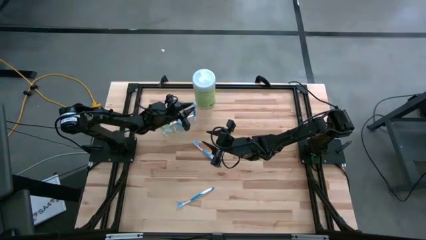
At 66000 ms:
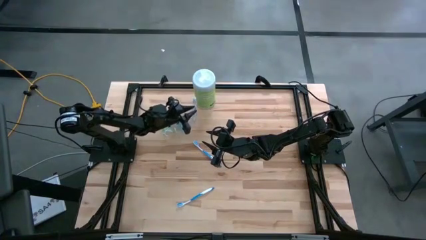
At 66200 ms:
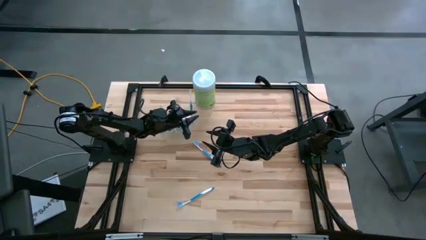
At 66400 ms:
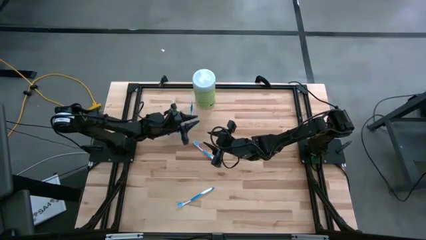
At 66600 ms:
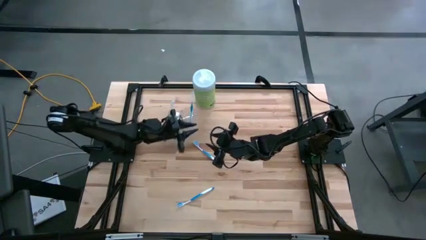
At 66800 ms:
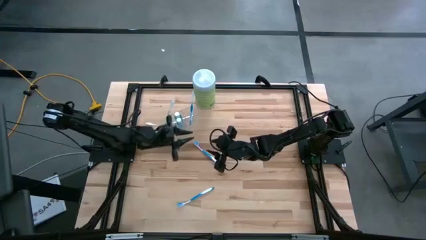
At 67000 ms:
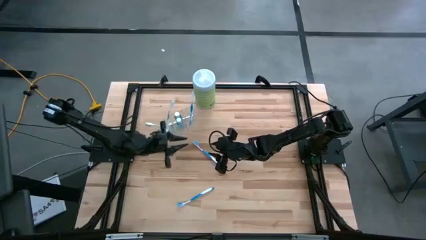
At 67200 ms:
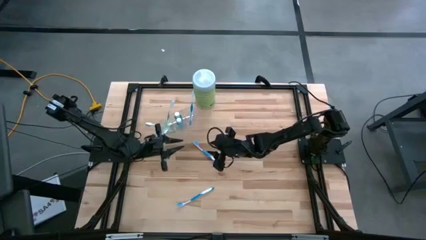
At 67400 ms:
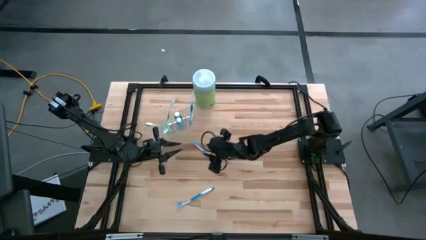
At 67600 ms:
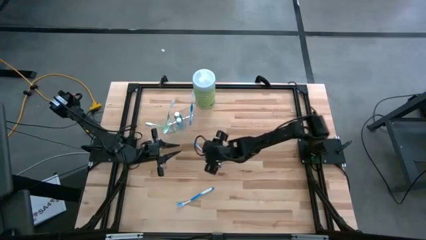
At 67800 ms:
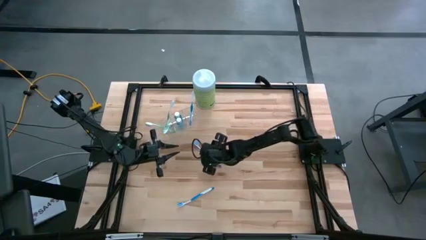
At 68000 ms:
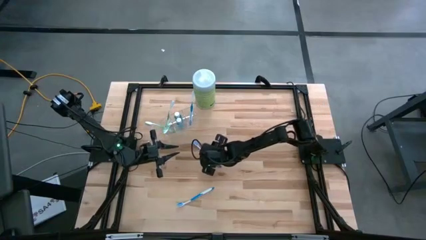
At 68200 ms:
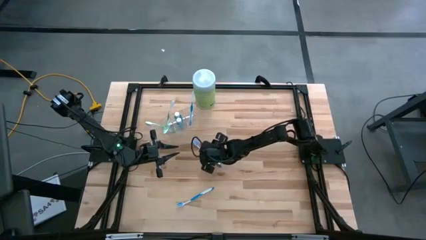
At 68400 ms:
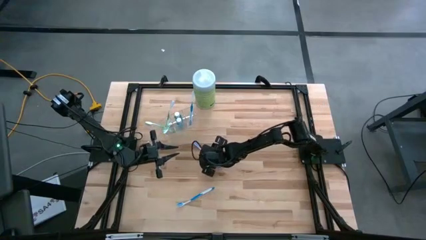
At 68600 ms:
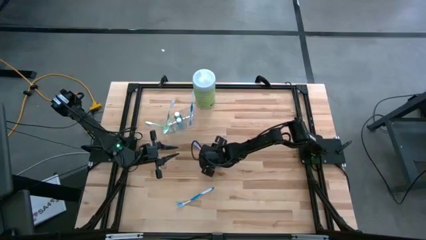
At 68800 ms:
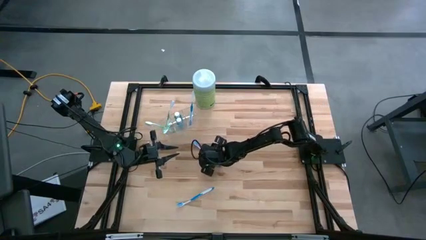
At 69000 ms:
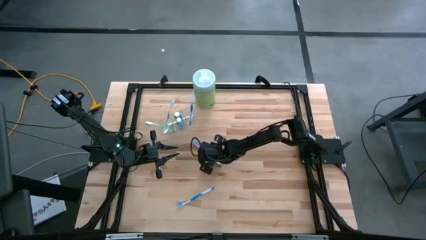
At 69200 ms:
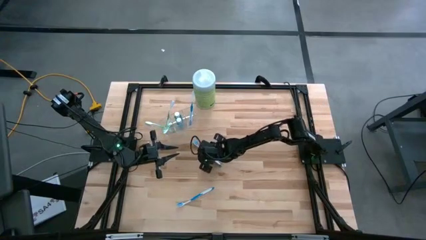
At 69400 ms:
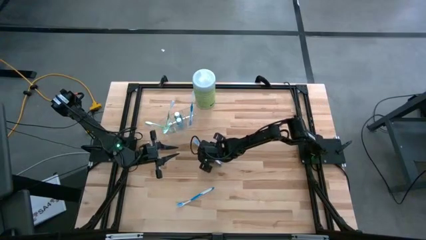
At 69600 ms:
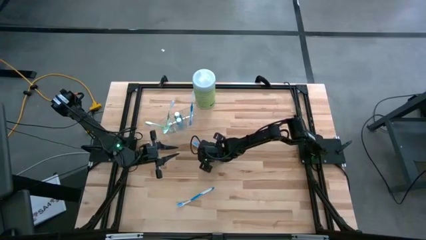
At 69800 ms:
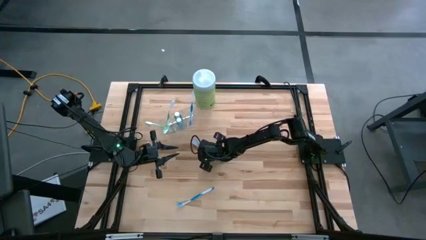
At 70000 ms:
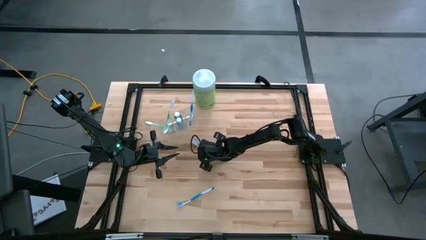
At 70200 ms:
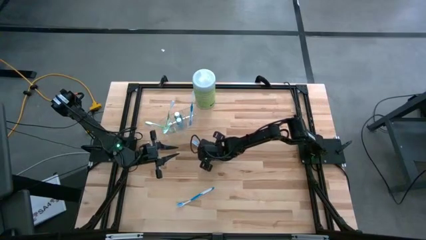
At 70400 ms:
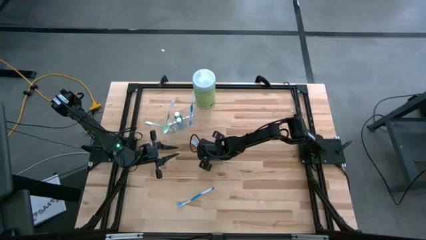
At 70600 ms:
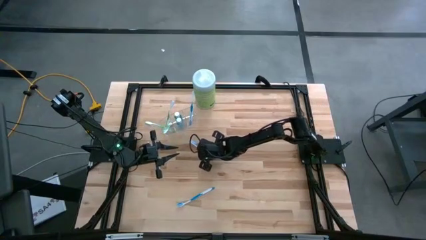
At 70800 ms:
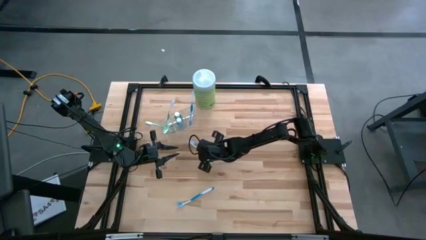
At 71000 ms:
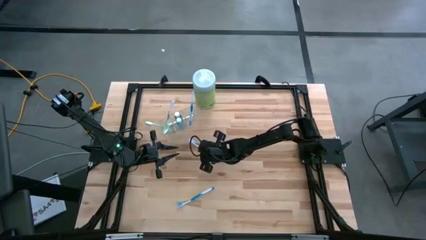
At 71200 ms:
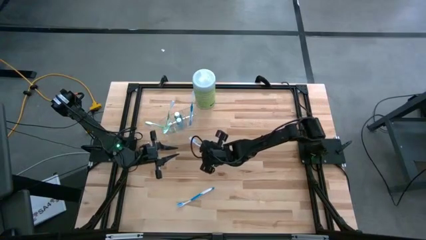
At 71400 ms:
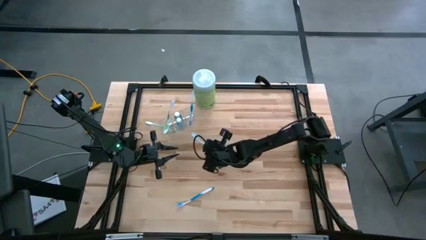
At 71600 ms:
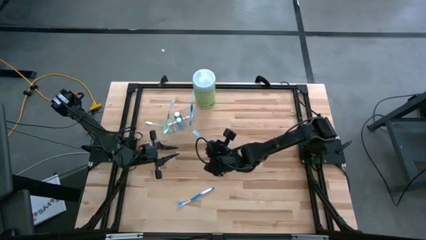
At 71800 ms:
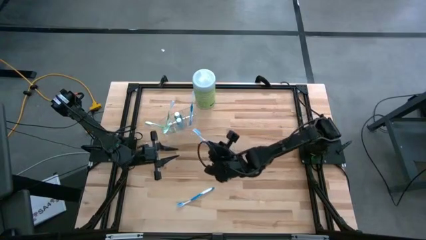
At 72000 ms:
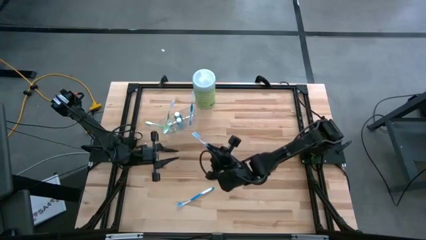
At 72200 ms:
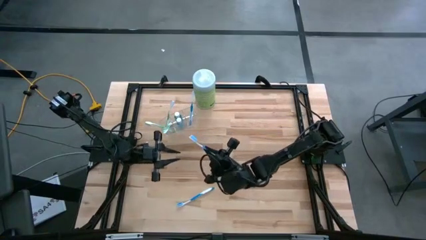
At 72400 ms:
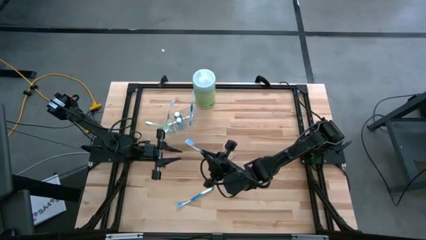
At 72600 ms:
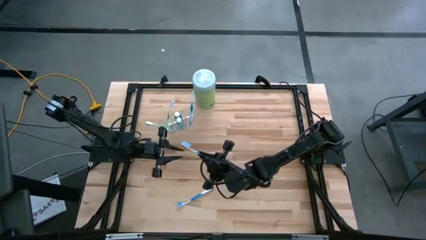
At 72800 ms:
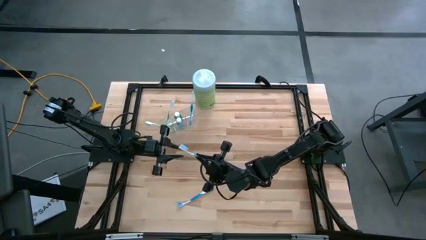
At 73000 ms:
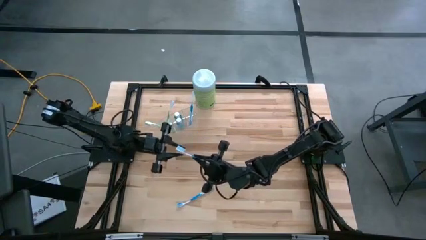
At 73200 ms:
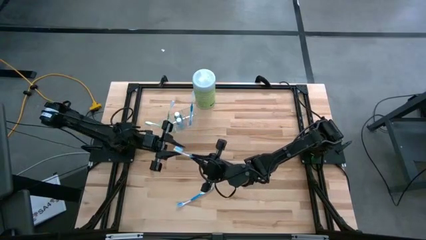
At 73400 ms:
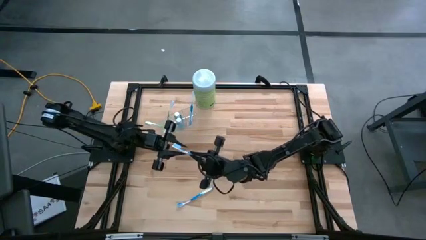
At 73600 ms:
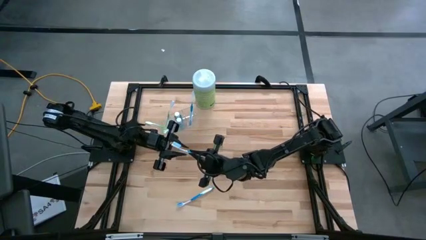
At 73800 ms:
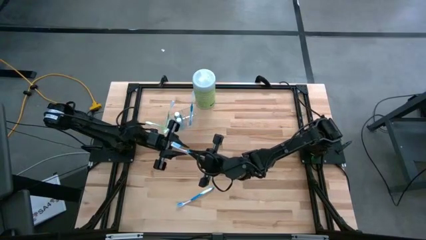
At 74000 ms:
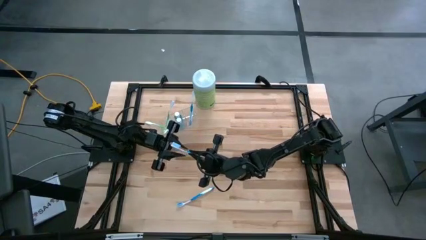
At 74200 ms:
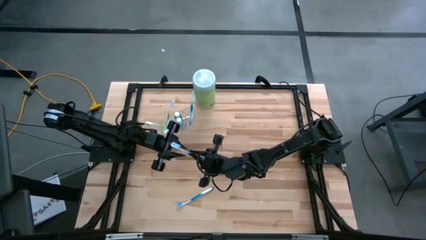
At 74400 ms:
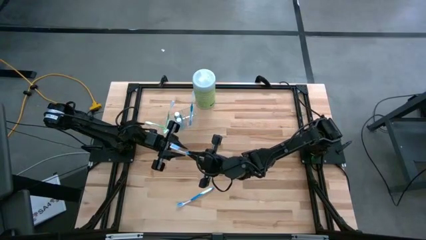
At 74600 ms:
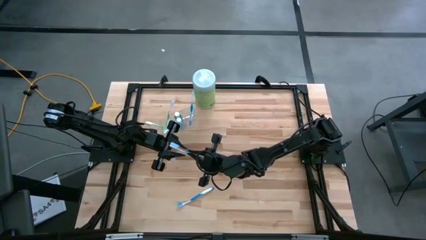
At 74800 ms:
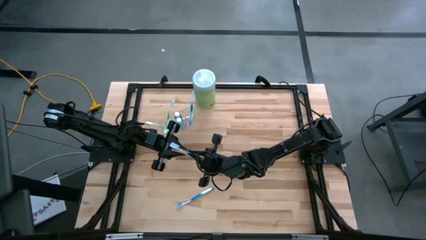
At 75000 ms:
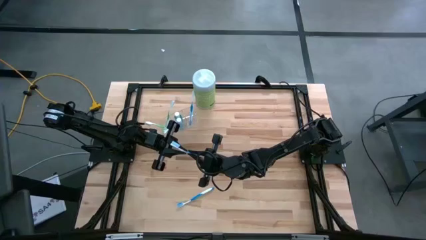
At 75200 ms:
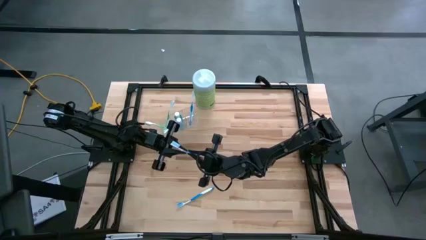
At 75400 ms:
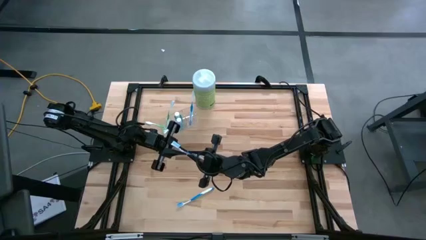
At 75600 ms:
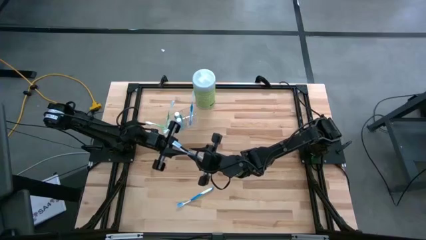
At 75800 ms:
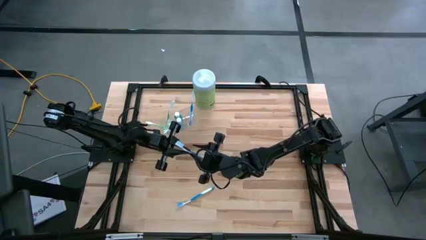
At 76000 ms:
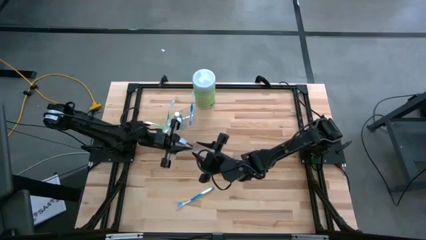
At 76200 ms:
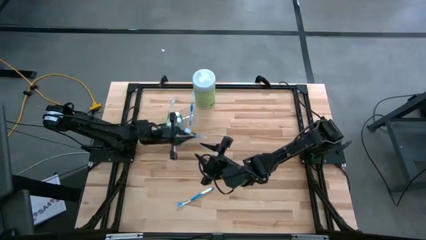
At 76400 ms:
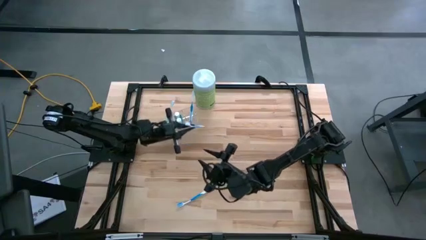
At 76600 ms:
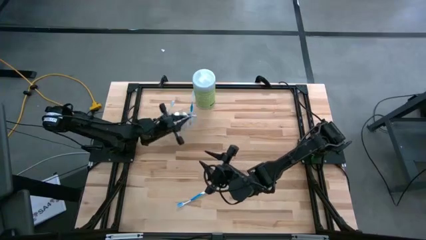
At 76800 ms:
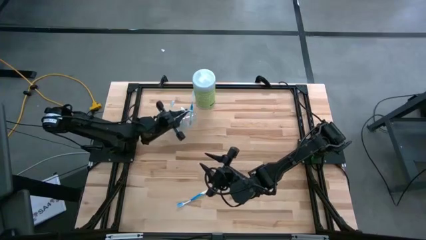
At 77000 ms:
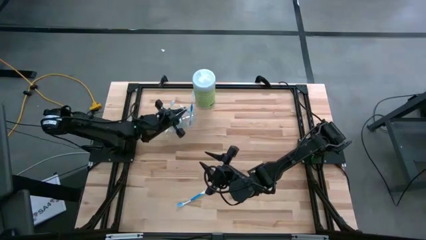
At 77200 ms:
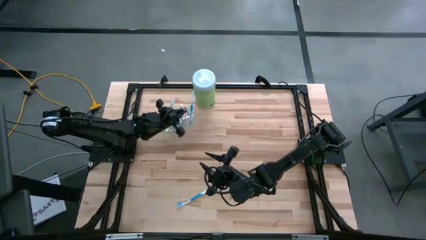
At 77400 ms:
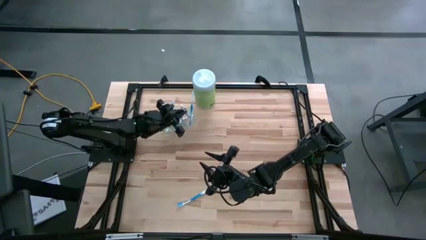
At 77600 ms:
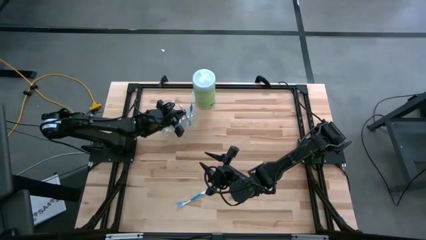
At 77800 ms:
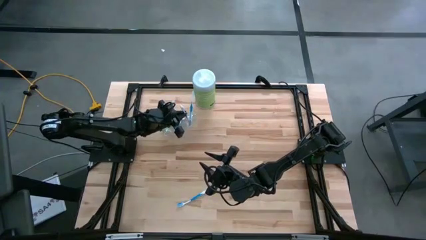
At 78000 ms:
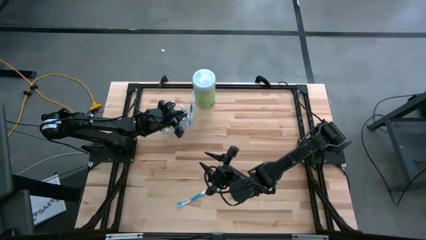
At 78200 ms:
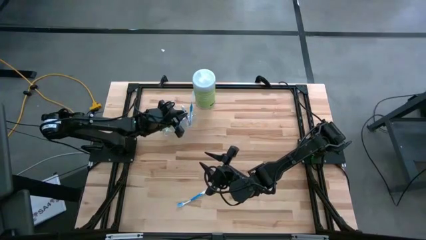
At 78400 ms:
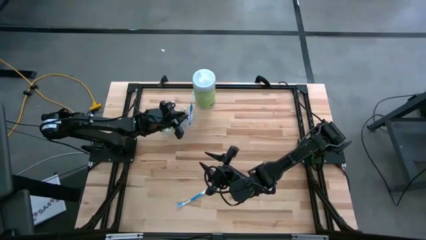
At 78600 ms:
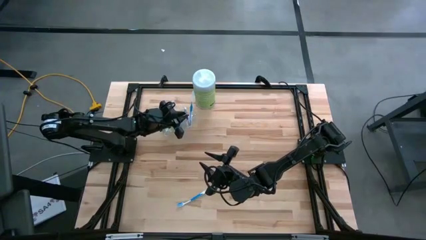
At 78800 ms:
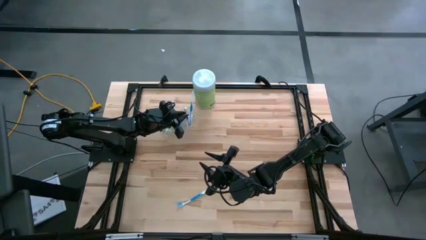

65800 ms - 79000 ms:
Task: Pick & Place toothbrushing station
Put the blue toothbrush into the transparent organizer

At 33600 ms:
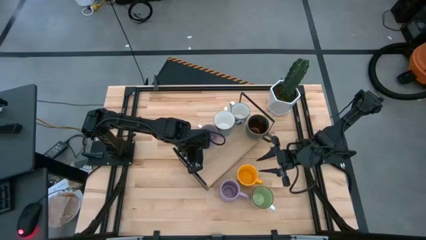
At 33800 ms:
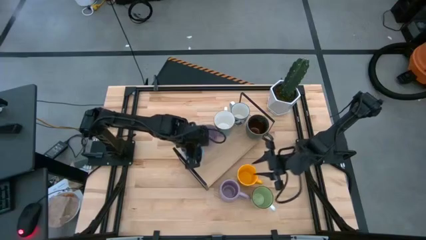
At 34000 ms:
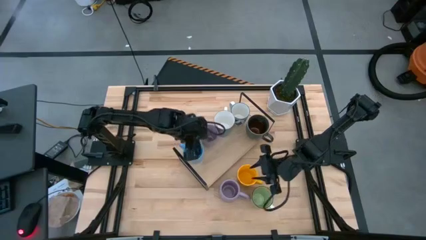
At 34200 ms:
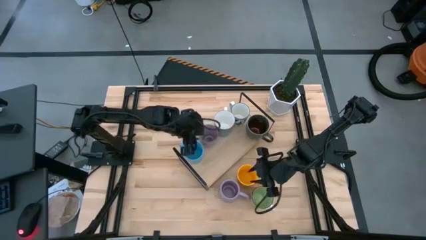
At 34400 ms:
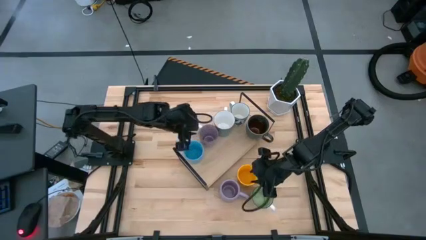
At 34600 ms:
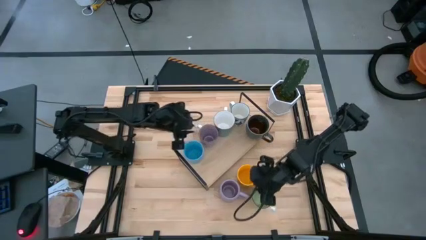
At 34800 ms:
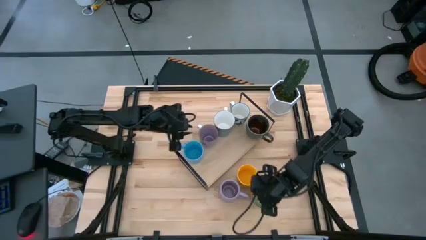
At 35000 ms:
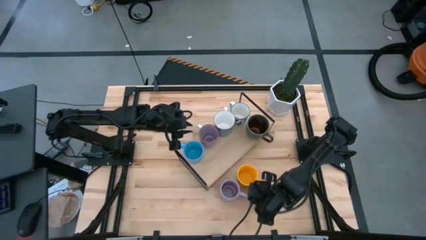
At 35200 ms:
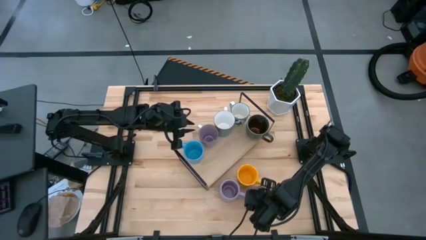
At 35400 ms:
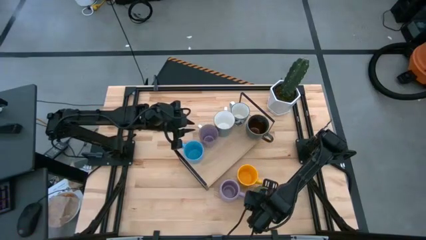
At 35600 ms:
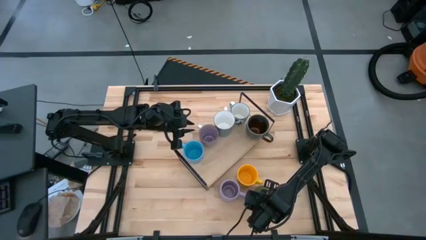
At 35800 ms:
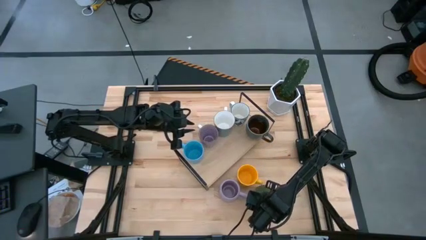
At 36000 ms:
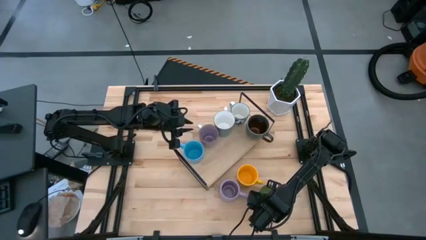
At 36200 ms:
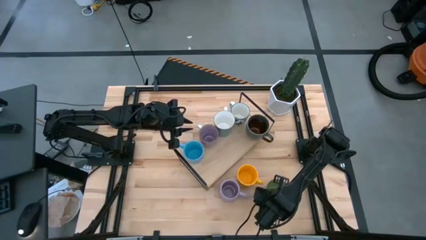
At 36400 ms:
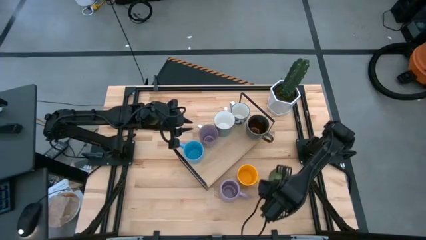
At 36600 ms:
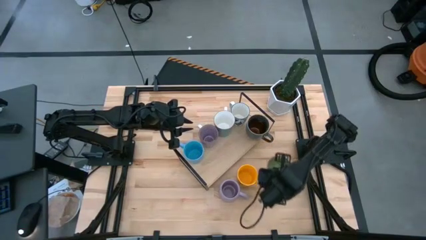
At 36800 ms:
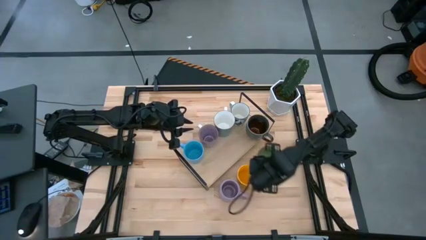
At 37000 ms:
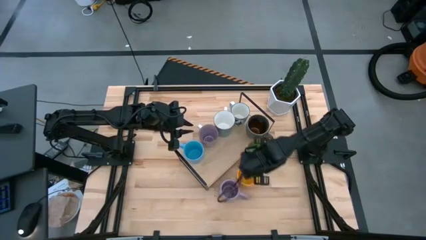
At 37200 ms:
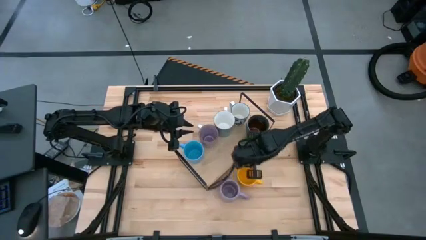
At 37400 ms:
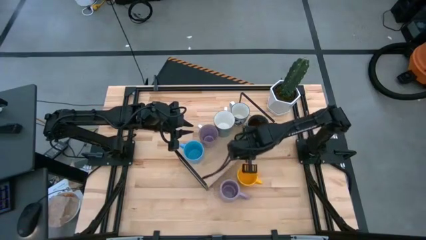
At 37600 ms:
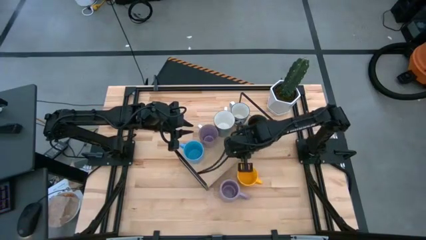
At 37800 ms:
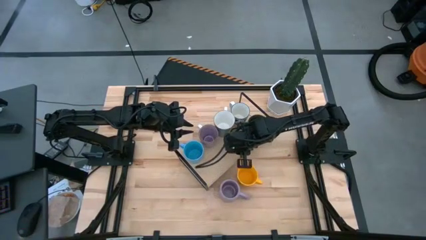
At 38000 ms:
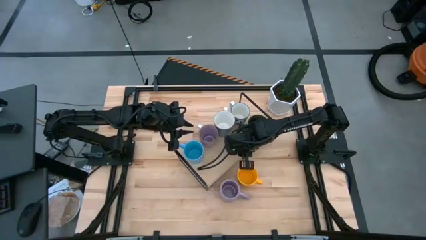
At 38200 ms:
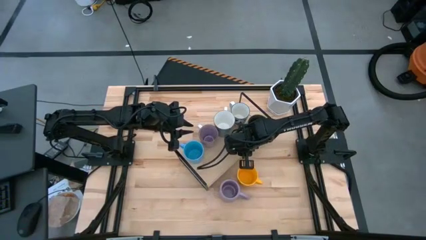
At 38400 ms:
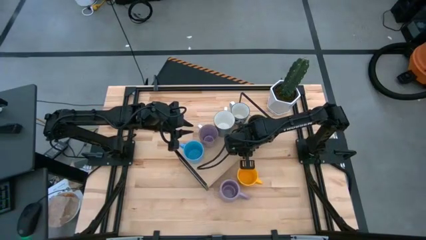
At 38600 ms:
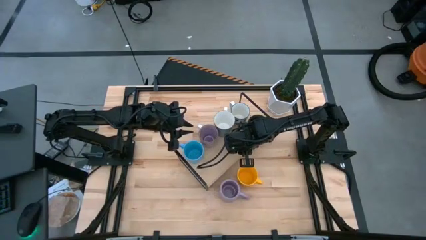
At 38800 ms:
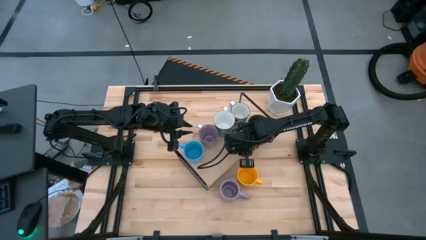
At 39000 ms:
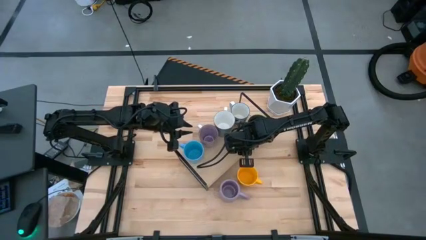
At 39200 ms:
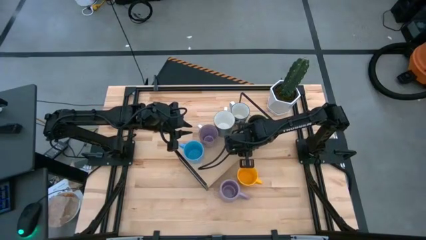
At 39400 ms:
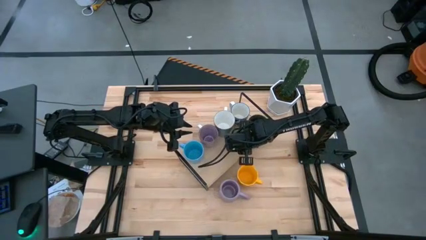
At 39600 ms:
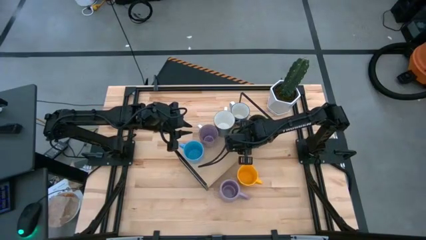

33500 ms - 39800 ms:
Task: Place coffee mugs
Put the light green mug on the shelf
